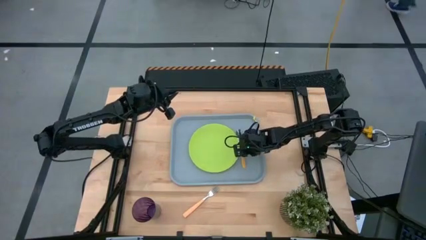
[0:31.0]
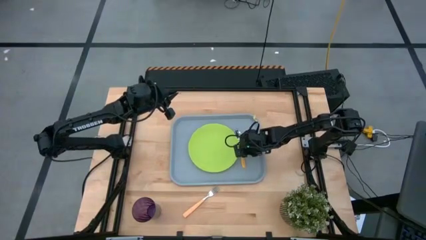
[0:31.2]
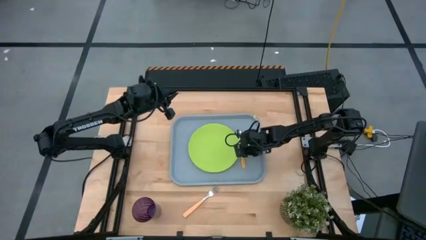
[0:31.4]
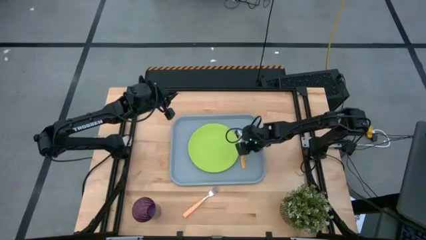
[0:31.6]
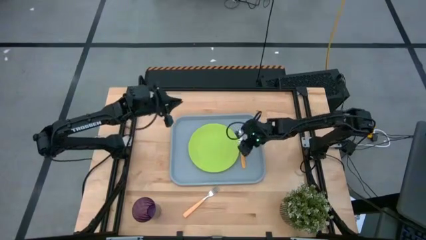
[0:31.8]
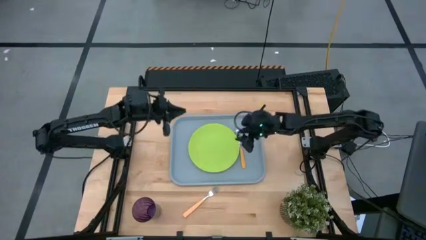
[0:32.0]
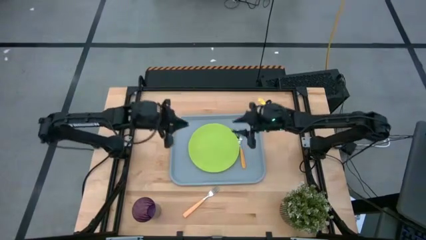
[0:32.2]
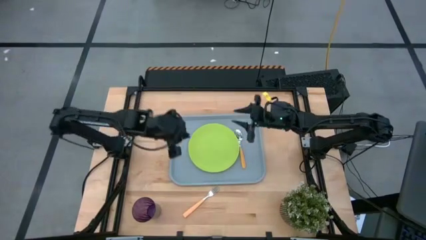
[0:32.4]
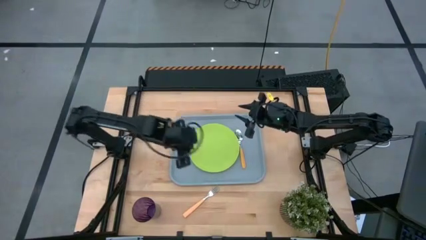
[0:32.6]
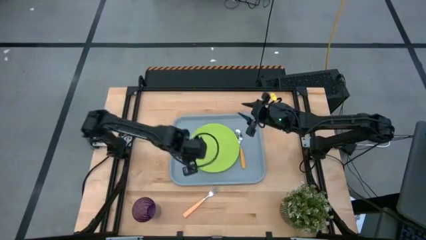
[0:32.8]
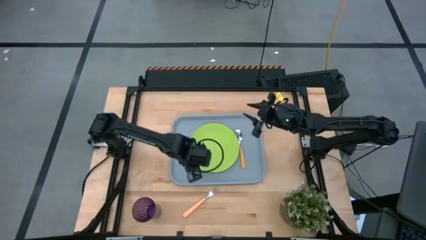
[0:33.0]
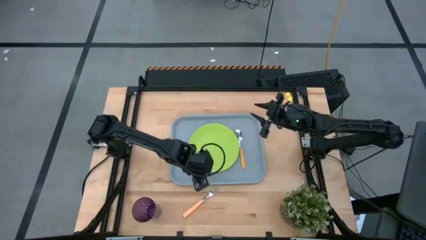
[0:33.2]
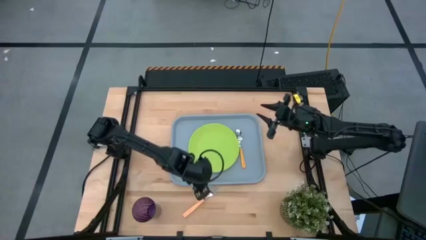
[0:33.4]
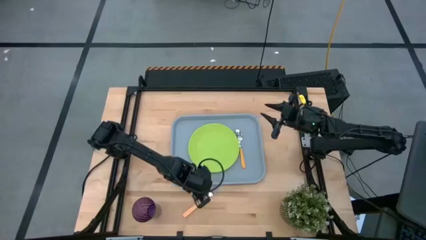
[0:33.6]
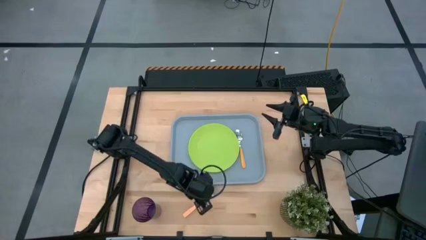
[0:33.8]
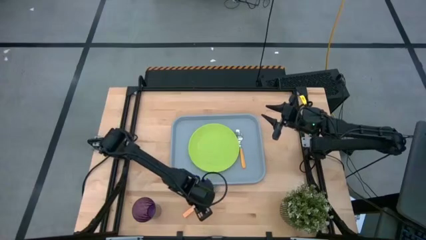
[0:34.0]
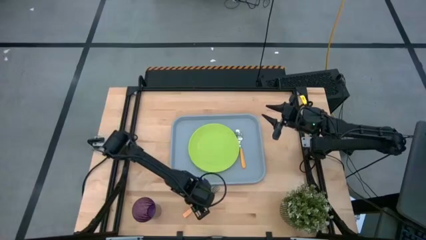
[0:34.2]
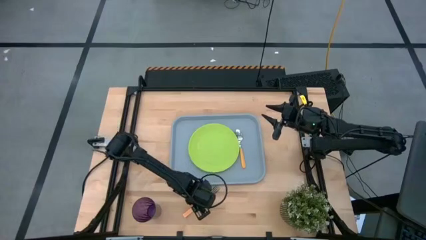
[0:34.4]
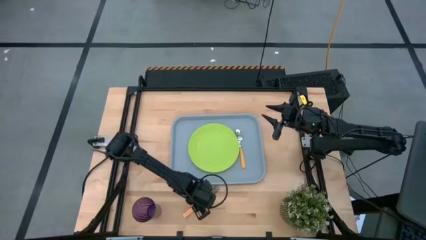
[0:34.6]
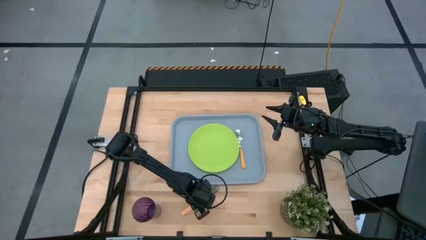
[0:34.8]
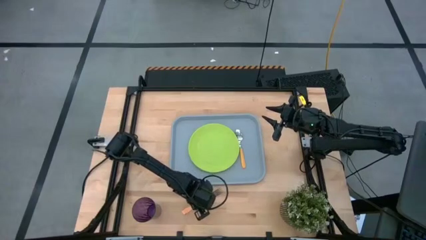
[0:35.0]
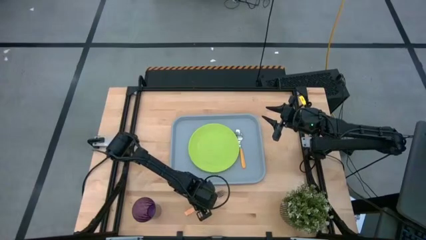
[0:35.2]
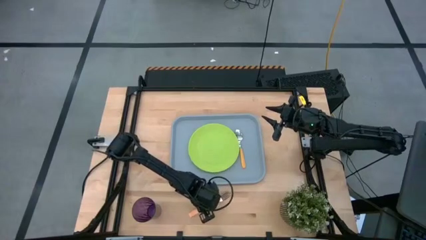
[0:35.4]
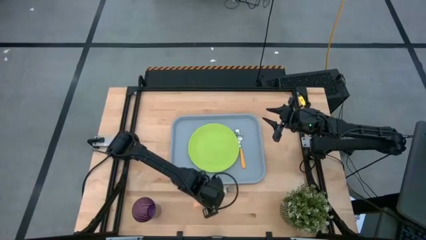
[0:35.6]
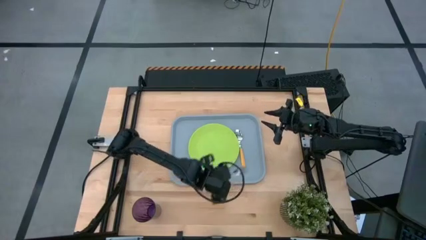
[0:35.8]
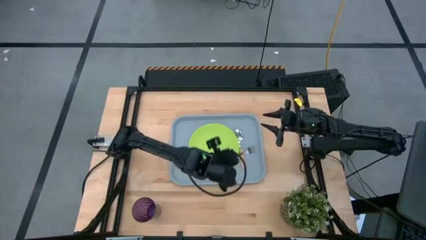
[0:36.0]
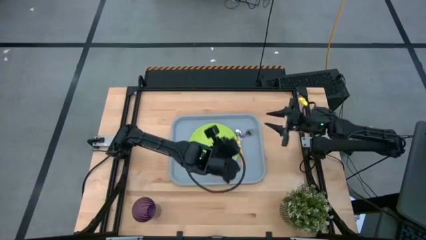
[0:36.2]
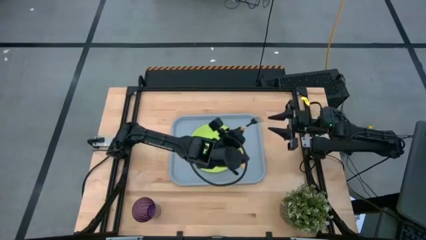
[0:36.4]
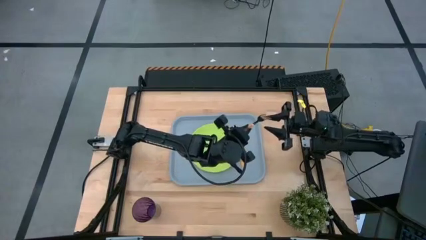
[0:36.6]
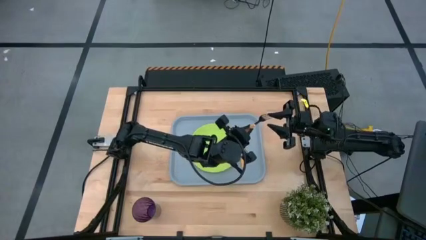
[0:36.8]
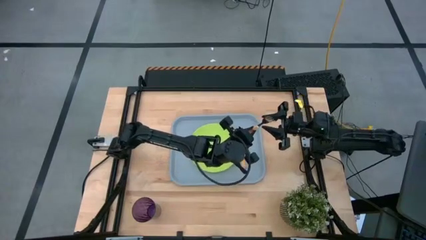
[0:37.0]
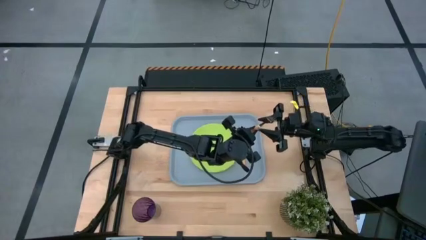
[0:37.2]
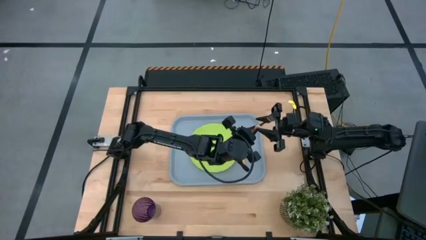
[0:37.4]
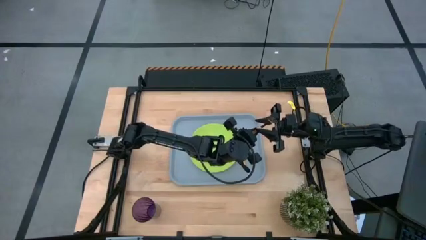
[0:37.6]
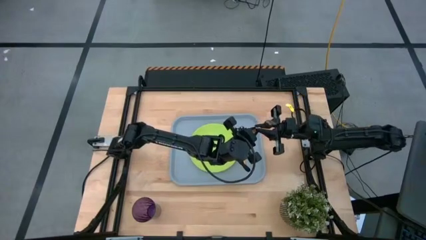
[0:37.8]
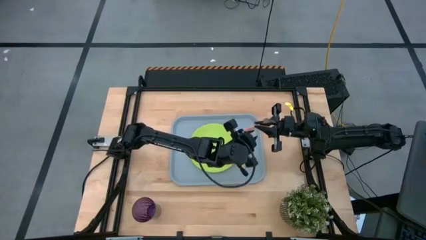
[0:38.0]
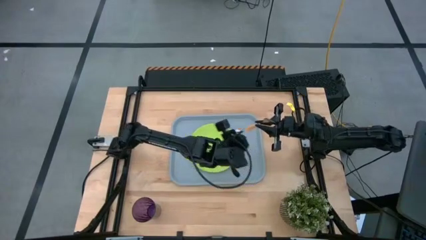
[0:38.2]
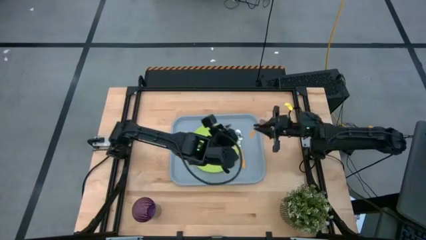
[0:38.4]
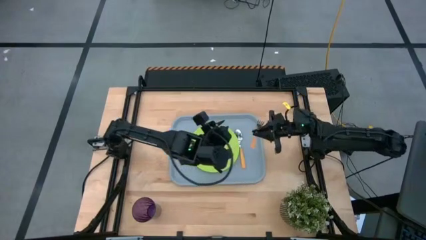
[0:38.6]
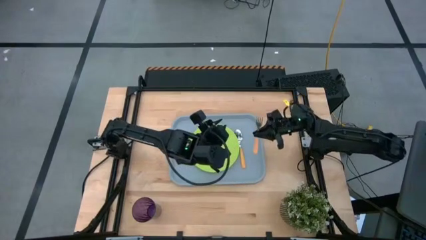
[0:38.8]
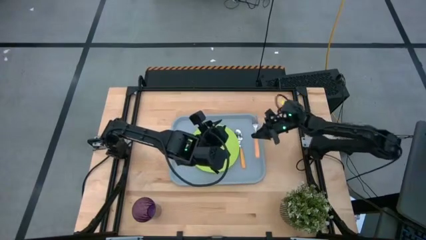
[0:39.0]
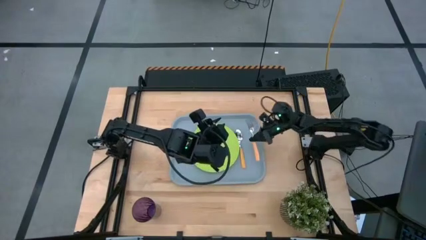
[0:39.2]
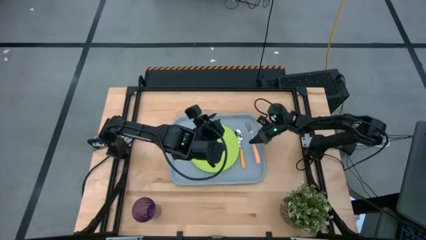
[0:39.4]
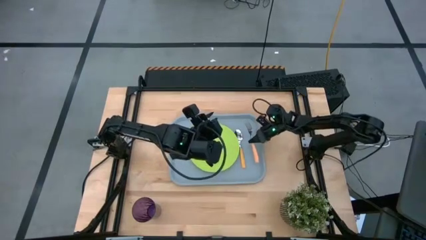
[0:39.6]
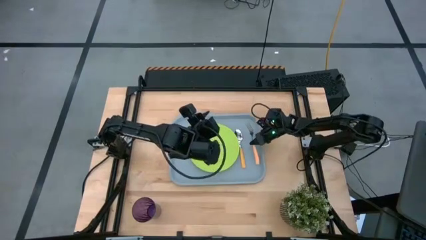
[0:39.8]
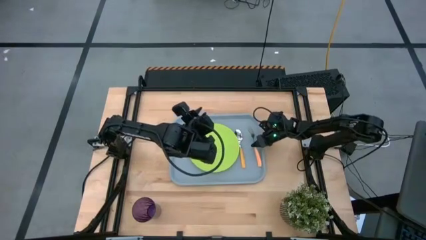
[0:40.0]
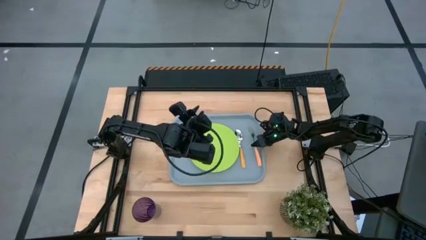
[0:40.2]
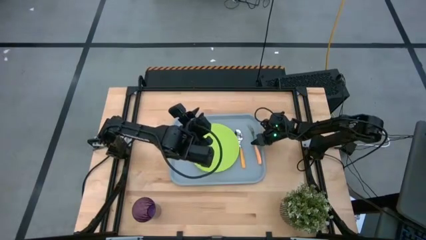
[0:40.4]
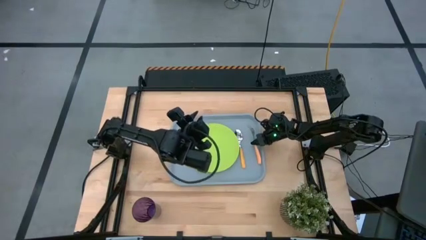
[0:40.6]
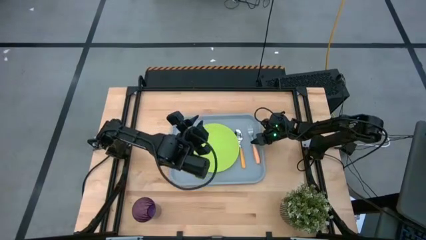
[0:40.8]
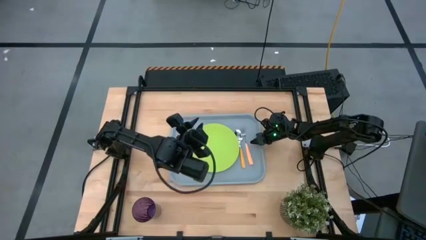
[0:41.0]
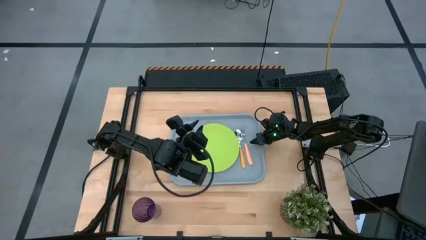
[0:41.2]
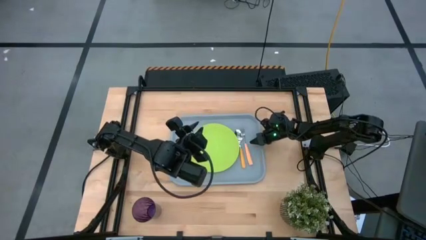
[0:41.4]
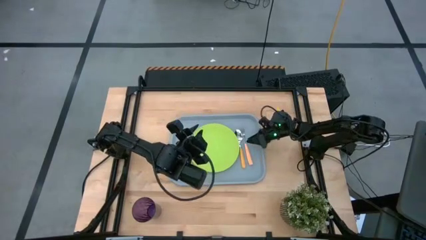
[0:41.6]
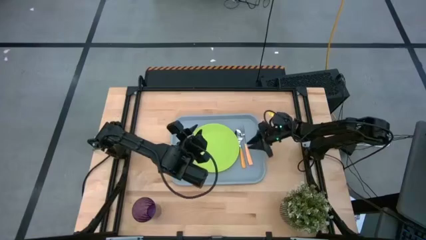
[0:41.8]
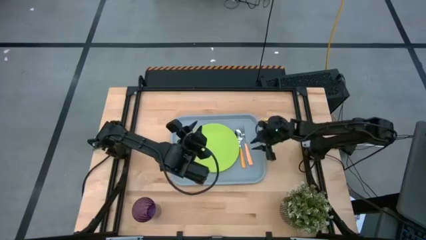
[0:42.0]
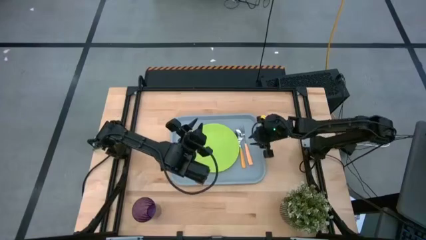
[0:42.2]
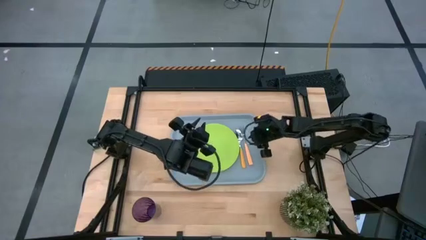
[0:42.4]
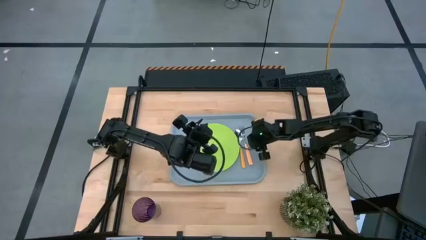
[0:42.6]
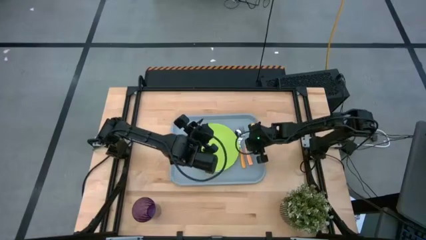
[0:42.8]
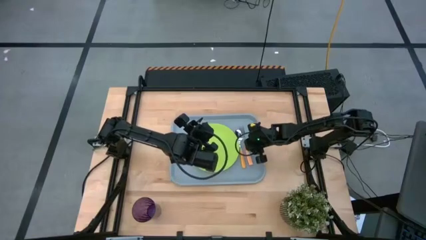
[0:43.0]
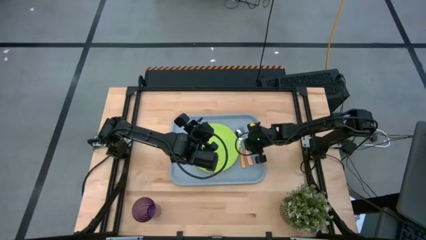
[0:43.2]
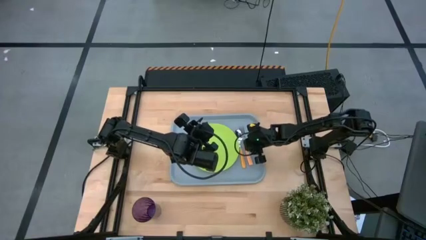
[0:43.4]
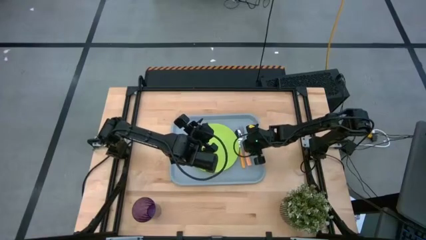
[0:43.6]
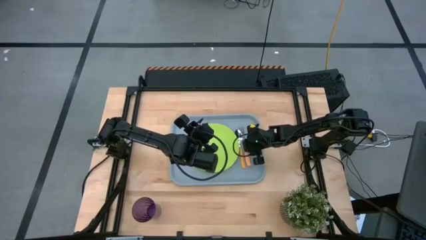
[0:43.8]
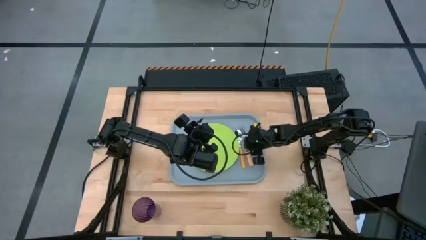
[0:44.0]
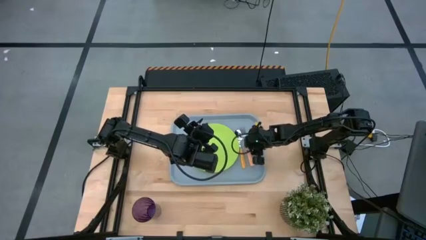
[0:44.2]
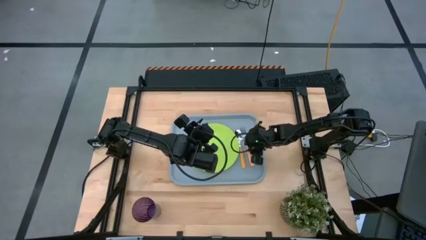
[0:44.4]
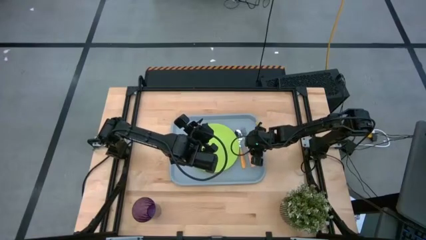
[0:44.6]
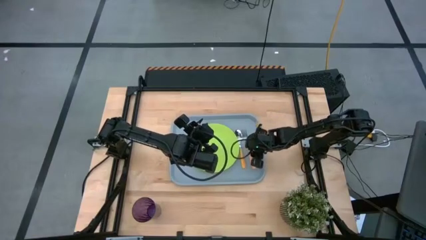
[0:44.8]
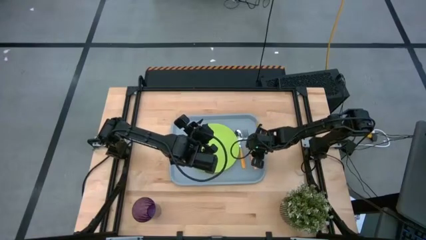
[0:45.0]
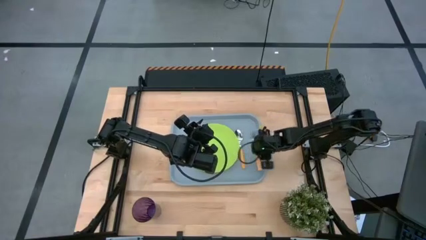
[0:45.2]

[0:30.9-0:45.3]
Task: Pick and place plate/cup/fork/spoon on tray
Put the light orange fork on the gray serving tray to the right of the yellow spoon
